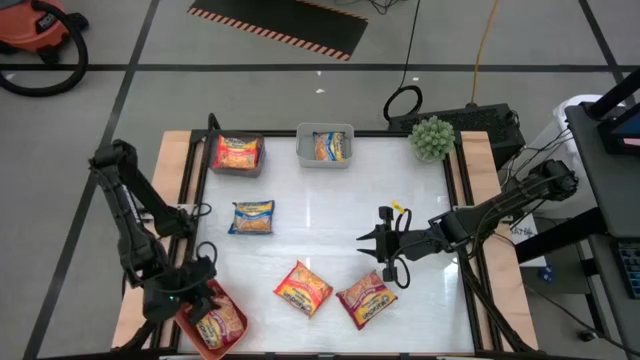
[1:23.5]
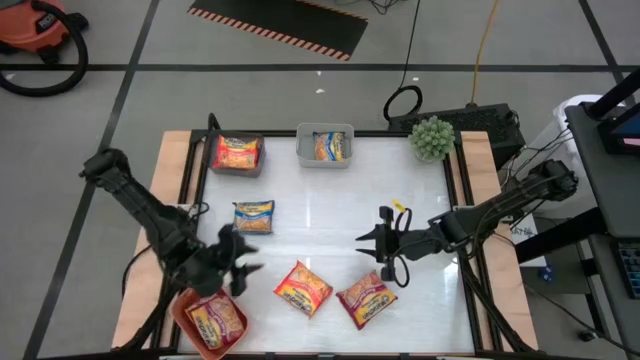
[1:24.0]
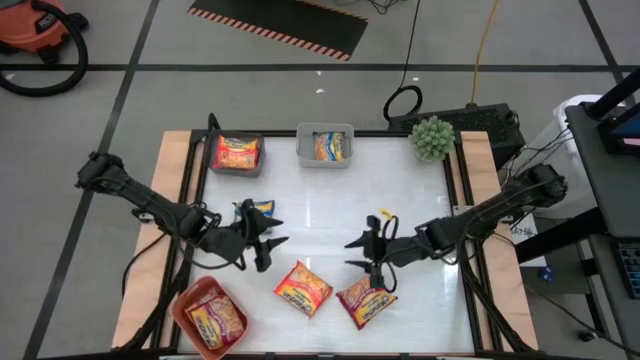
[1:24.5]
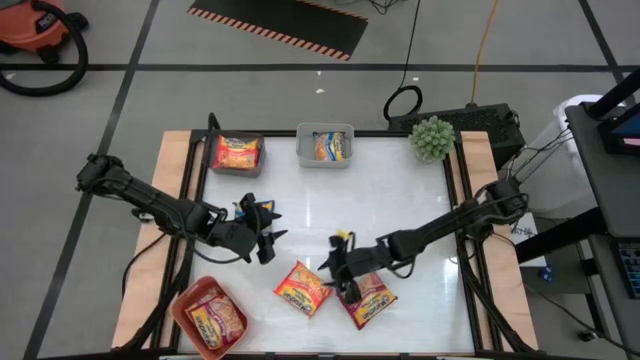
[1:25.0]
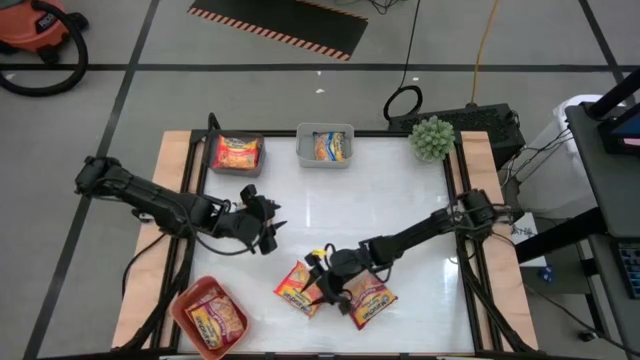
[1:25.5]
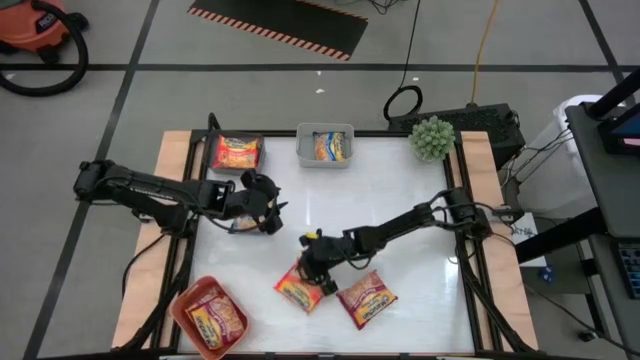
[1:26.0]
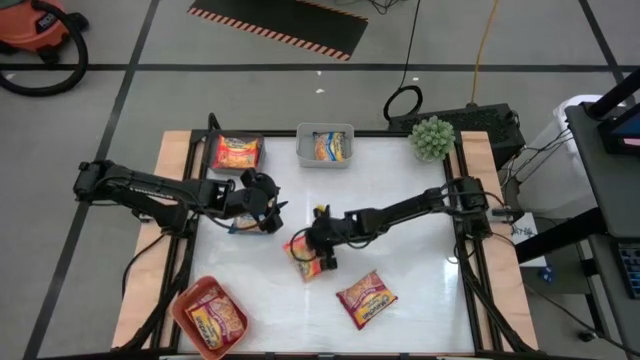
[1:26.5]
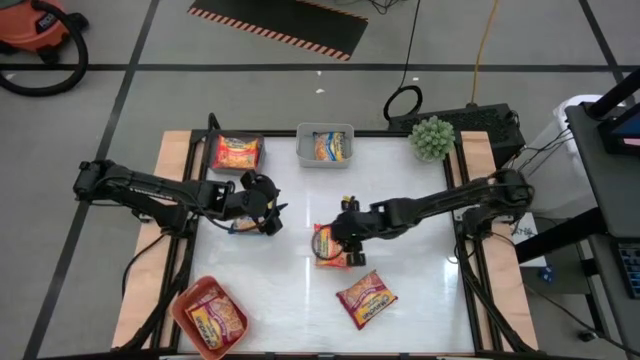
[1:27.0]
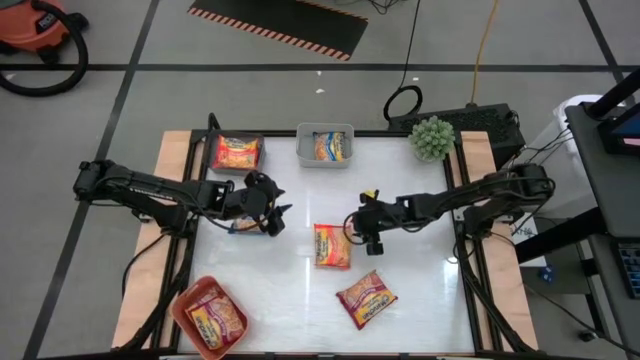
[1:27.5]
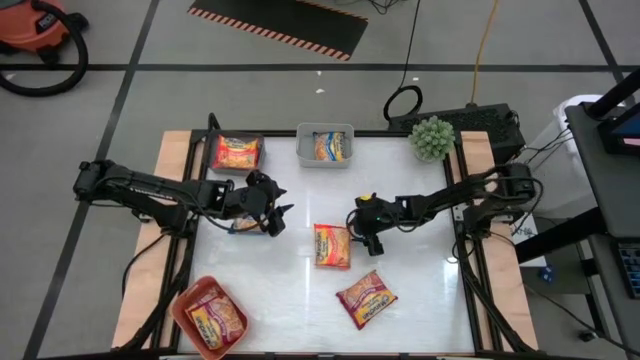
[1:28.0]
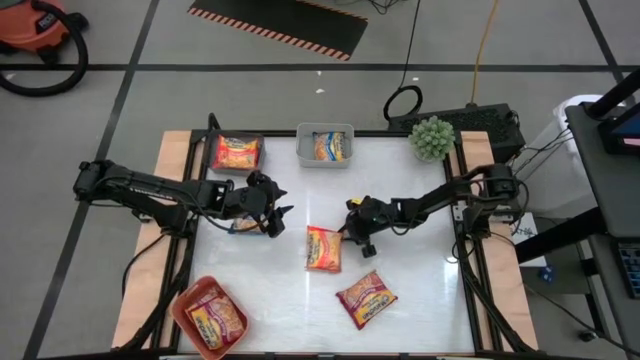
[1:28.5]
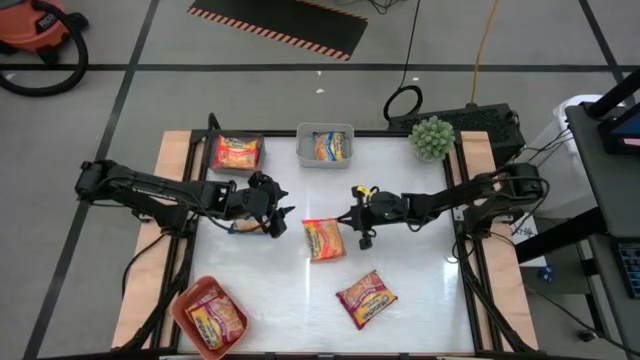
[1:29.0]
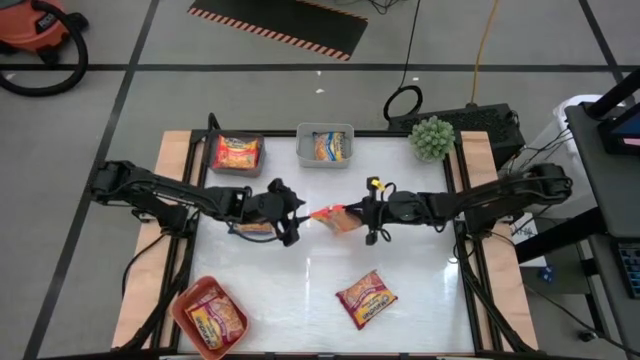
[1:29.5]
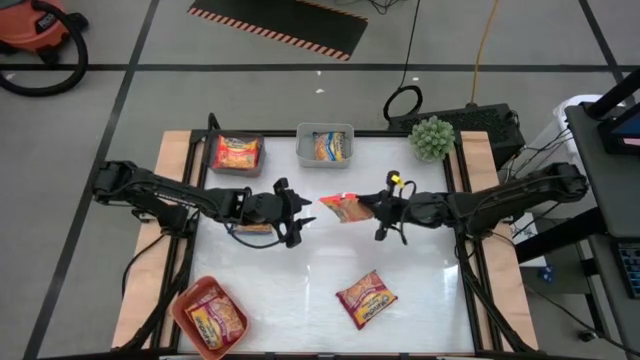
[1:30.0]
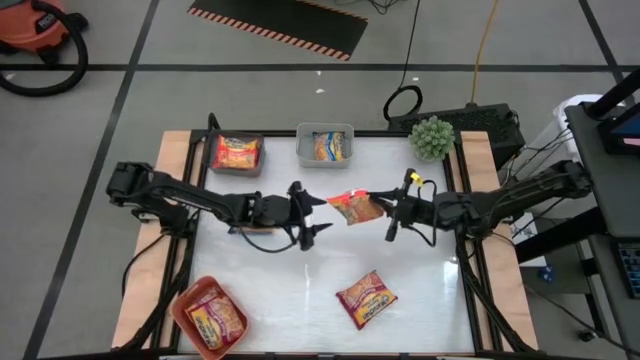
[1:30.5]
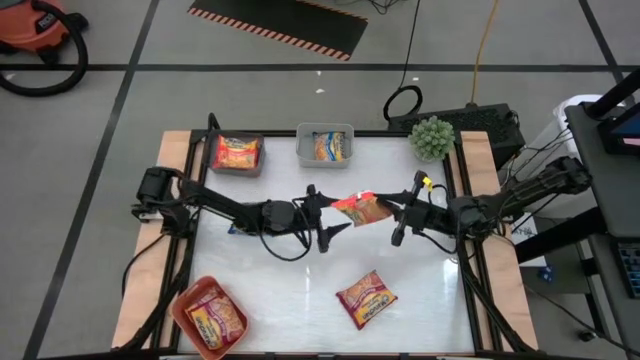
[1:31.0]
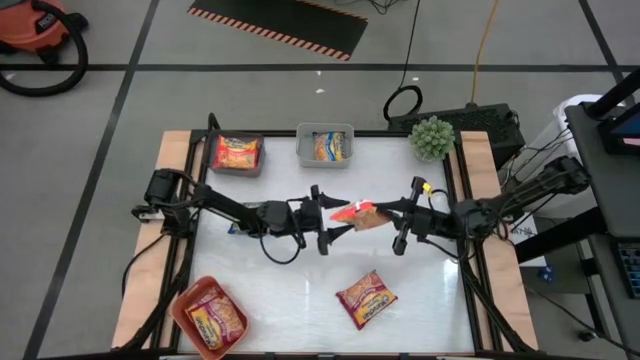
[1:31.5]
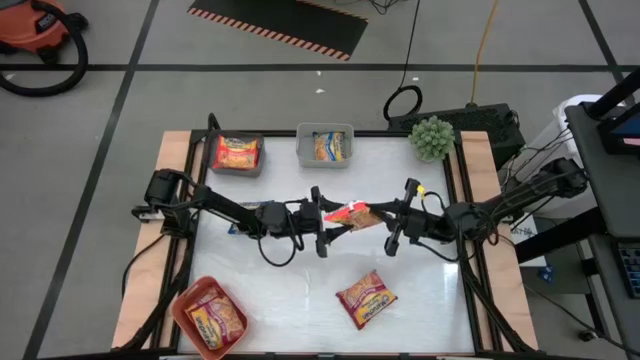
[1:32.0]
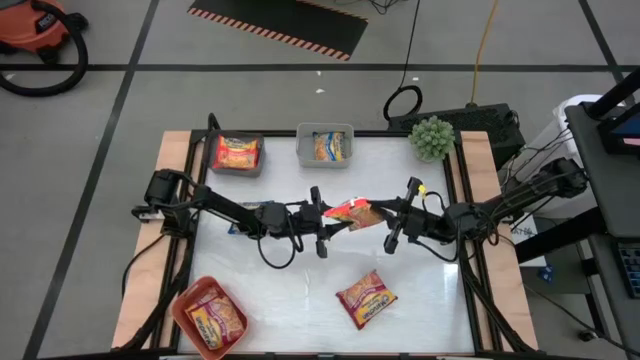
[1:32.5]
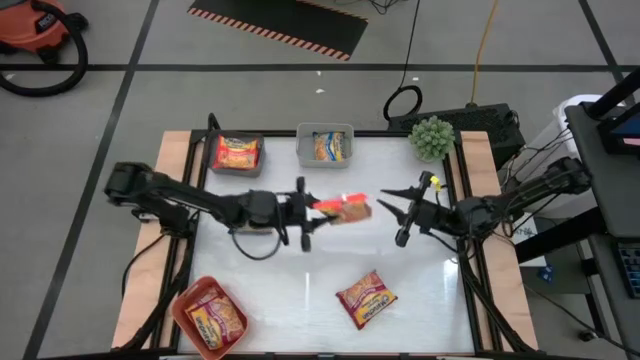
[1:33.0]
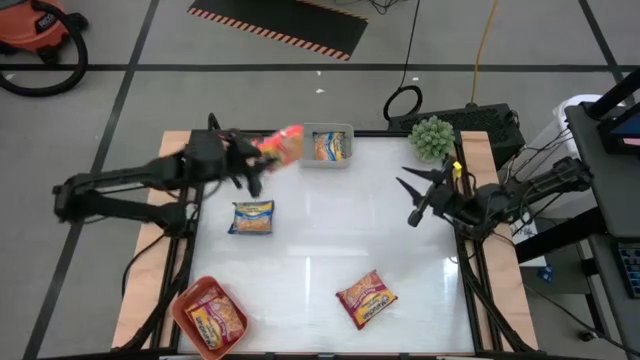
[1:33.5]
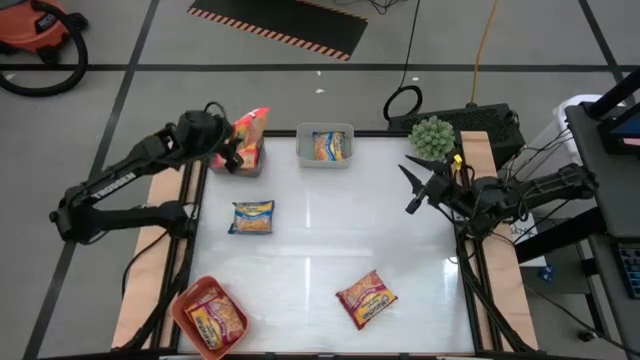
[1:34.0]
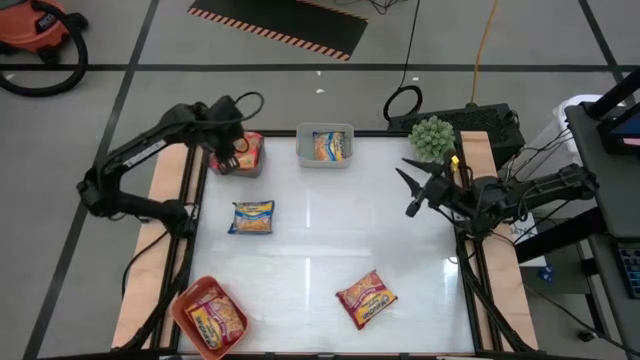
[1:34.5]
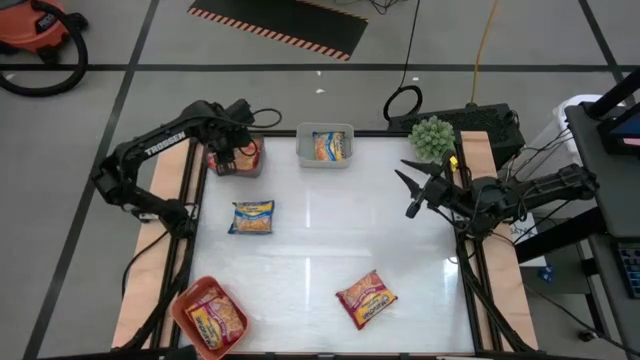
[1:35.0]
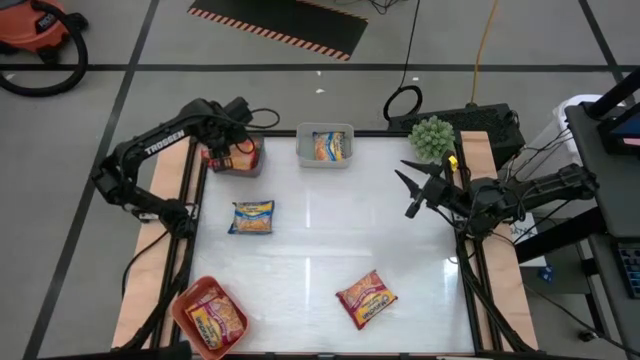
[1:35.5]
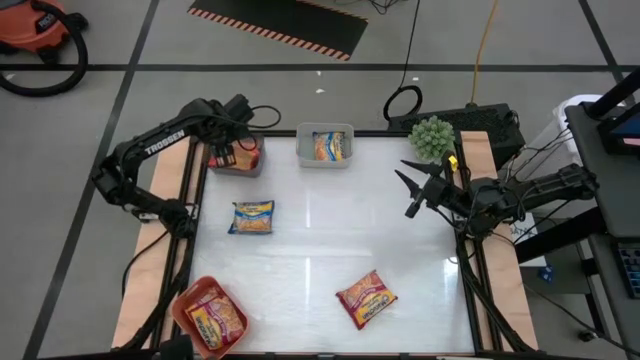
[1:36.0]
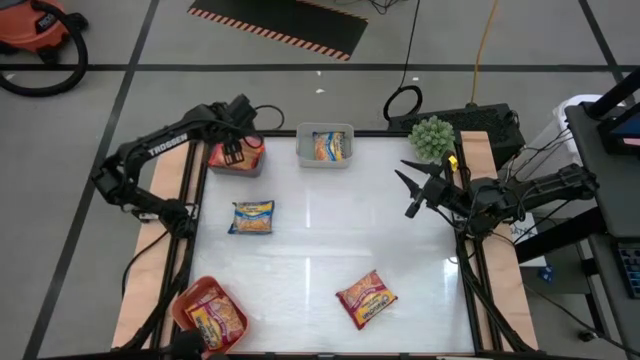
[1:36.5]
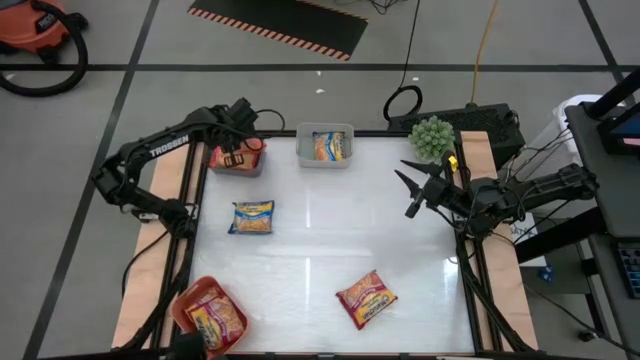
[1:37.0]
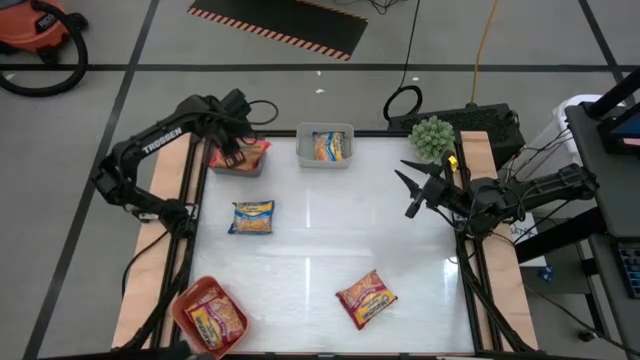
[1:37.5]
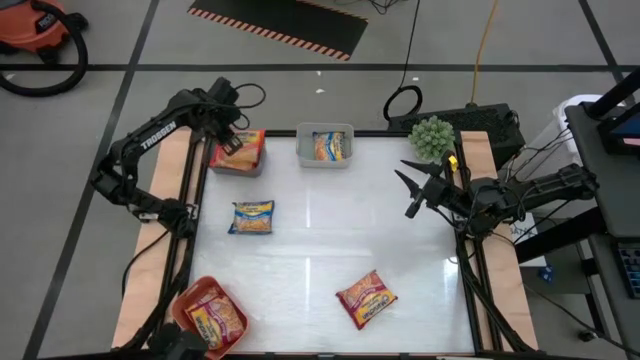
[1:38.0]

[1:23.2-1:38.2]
Task: Sort Maruchan noodles
Put the orange noodle pack into the black bin

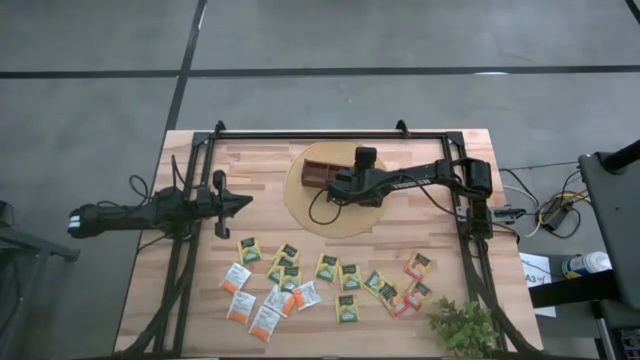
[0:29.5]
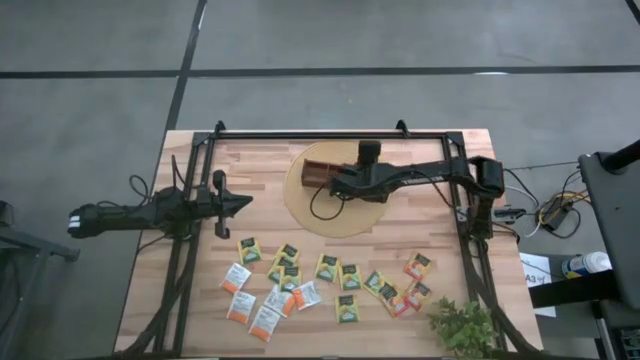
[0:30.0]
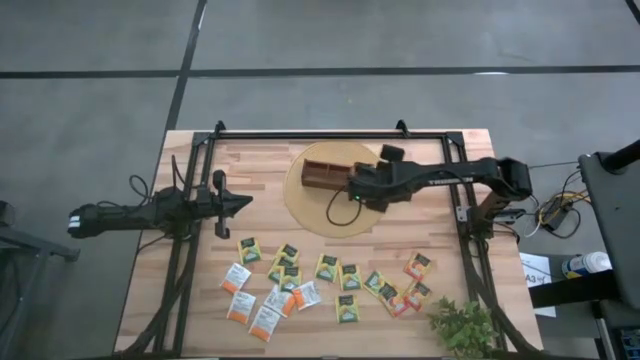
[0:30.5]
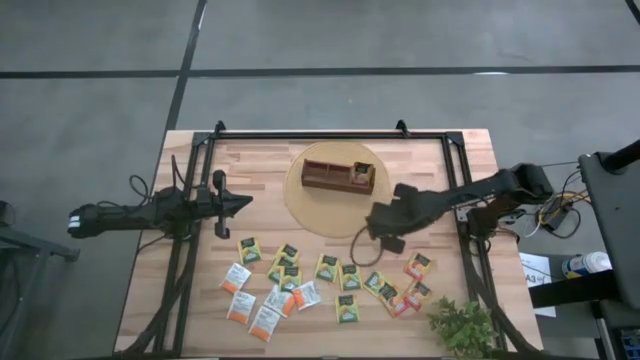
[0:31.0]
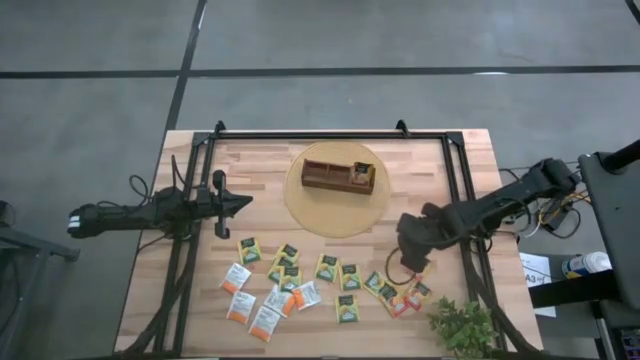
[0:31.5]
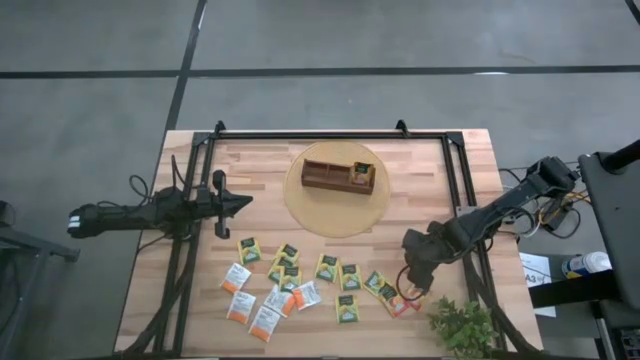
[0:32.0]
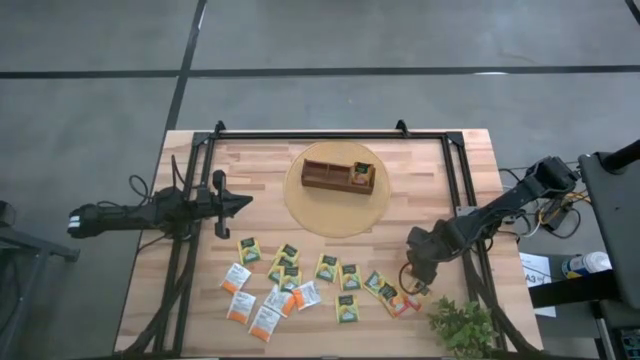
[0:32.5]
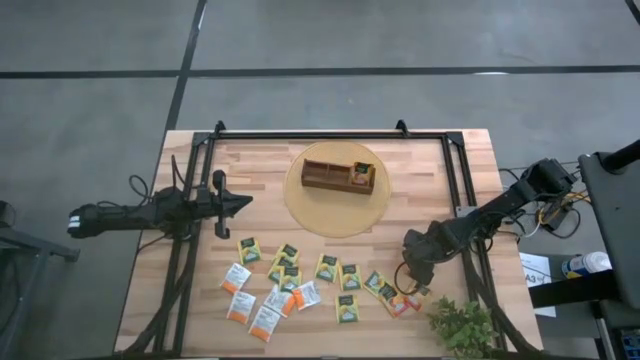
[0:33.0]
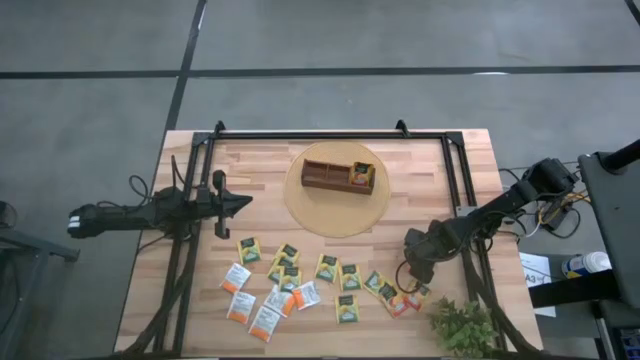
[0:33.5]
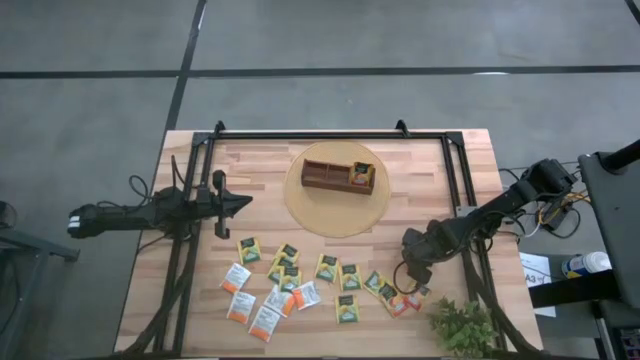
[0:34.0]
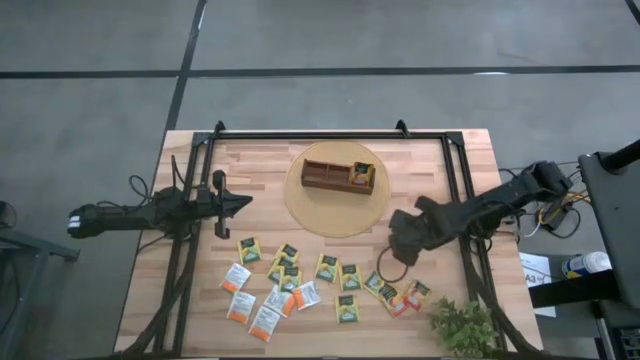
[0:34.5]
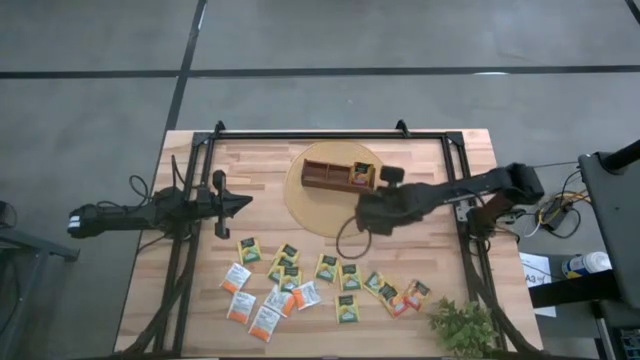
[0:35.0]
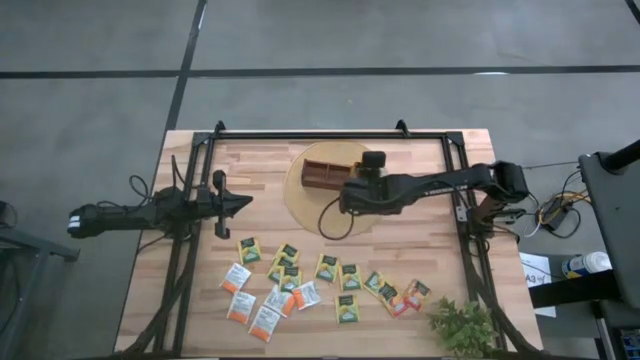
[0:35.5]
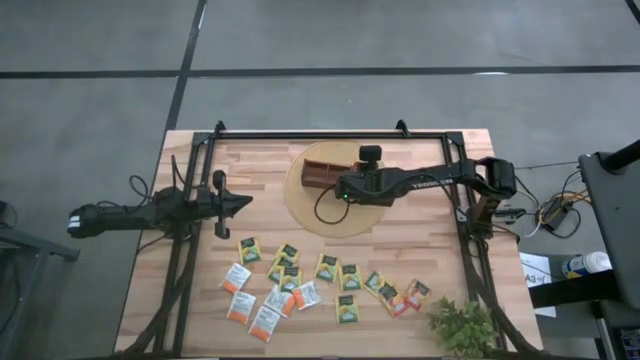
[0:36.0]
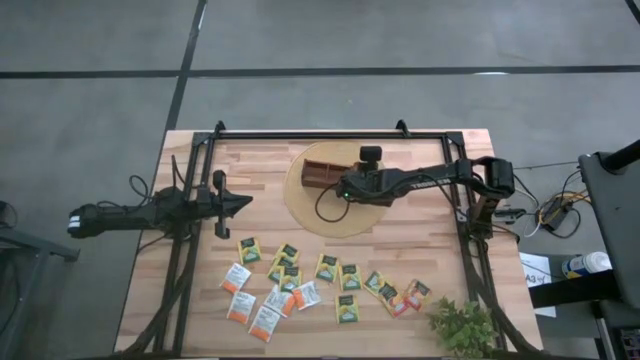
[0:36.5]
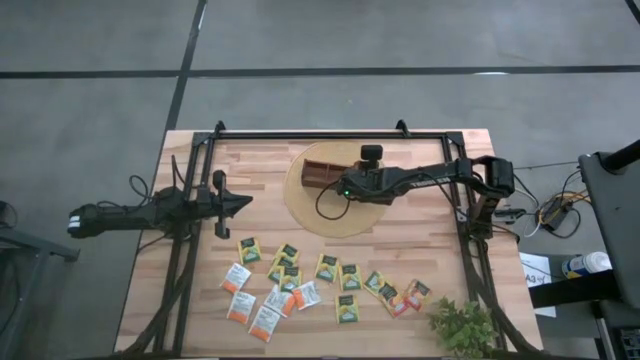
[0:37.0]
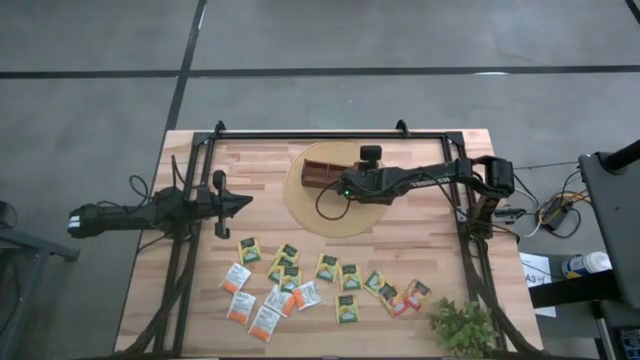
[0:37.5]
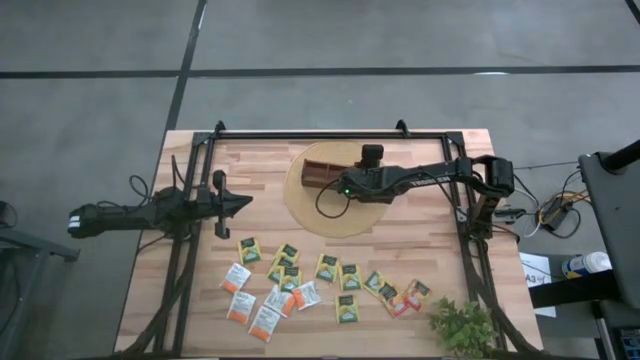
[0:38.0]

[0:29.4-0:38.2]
Task: Pick & Place Tea
Put the top orange tea bag into the right section of wooden organizer
